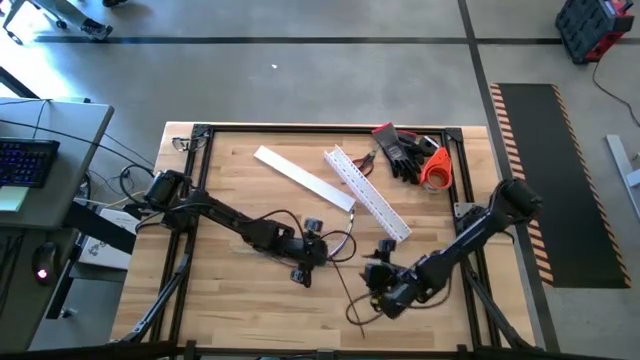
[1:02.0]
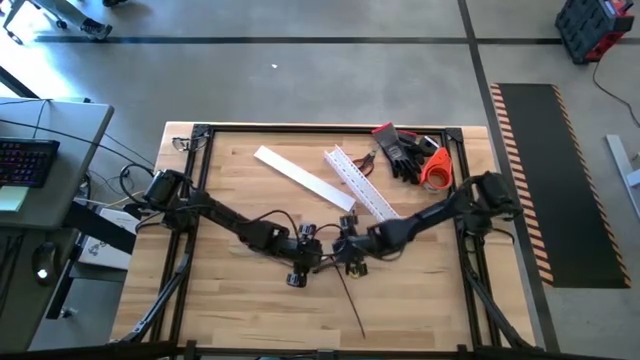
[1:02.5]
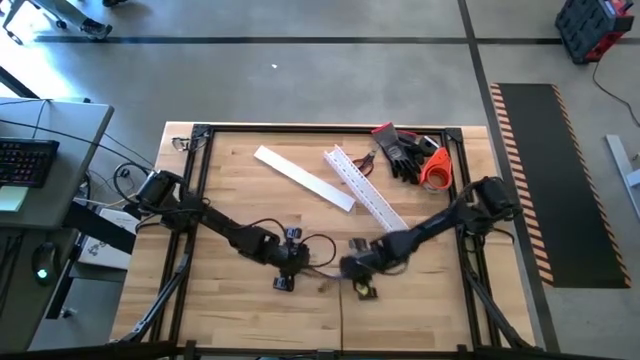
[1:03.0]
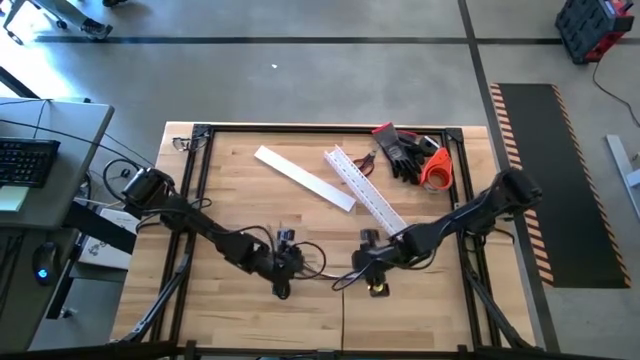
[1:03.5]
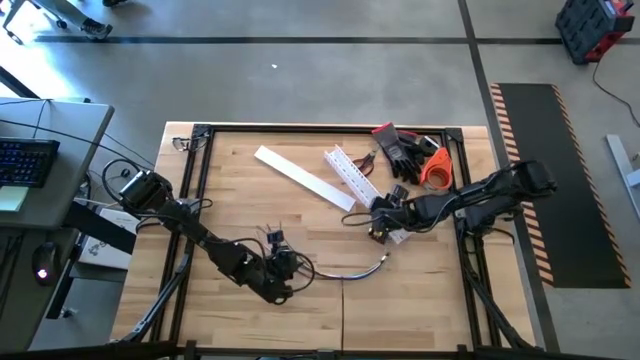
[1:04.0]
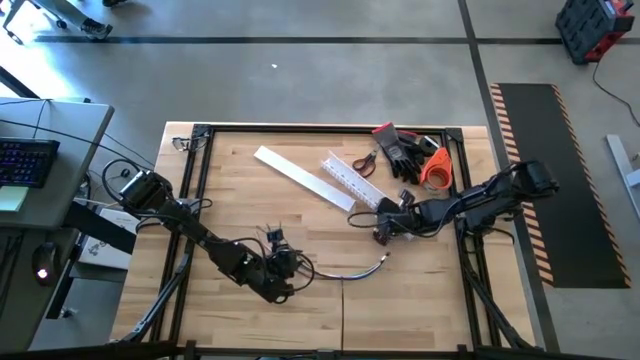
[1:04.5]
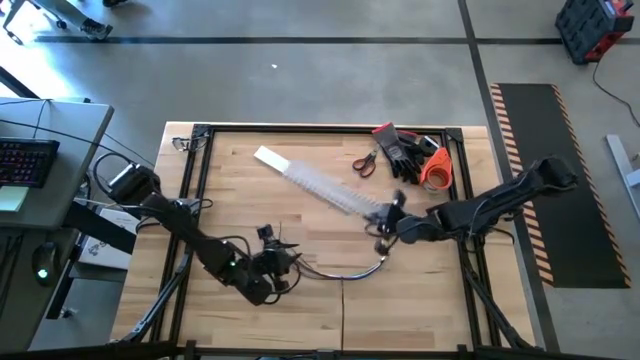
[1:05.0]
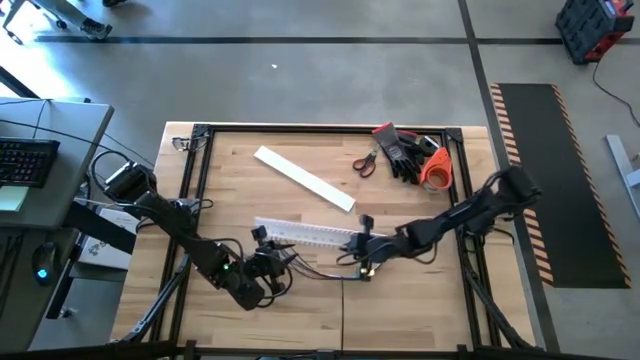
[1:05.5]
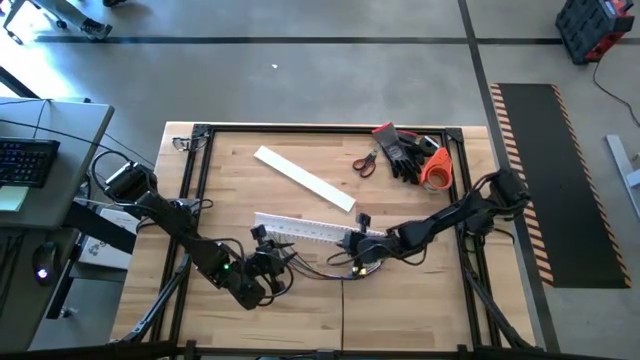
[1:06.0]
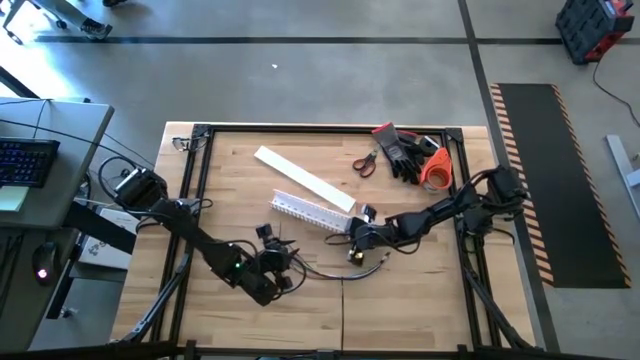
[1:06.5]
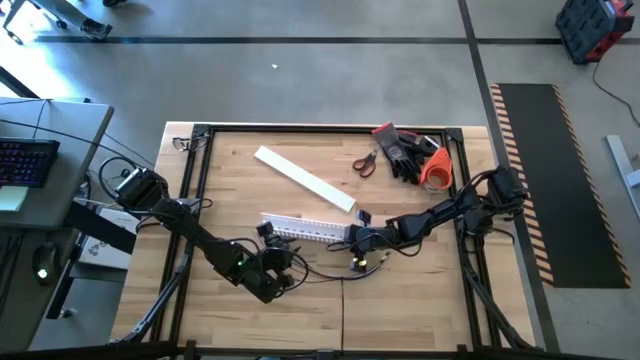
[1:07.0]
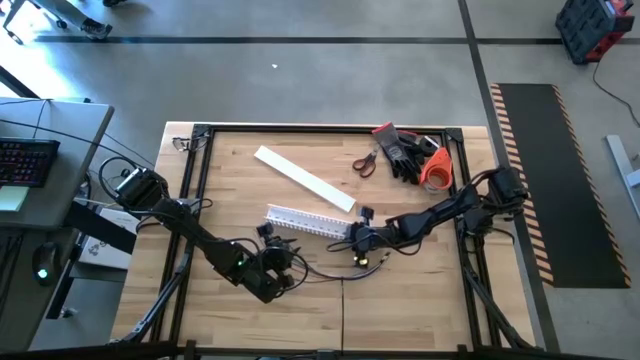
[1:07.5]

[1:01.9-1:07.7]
Task: Ziptie cables
Move the white cable duct to the center of the table

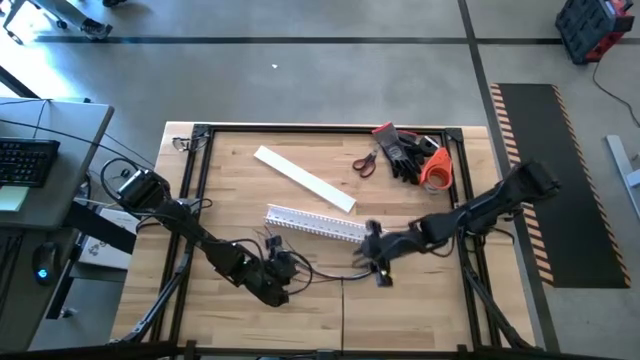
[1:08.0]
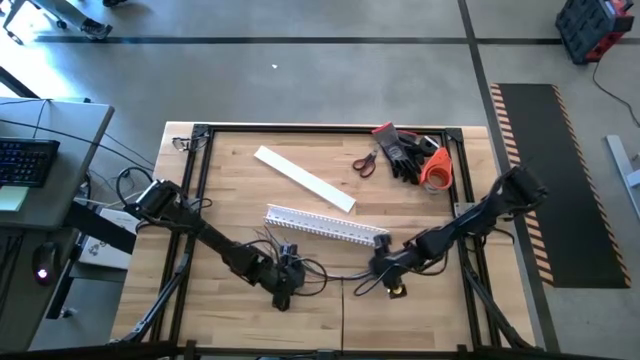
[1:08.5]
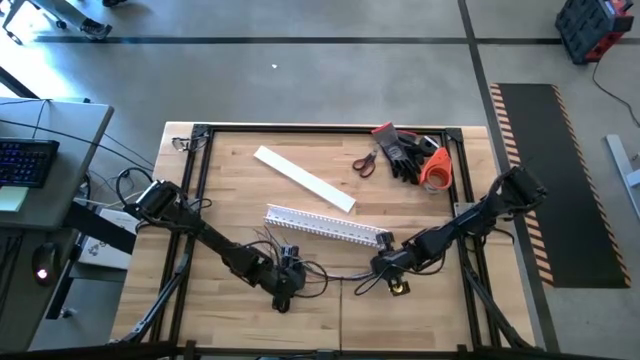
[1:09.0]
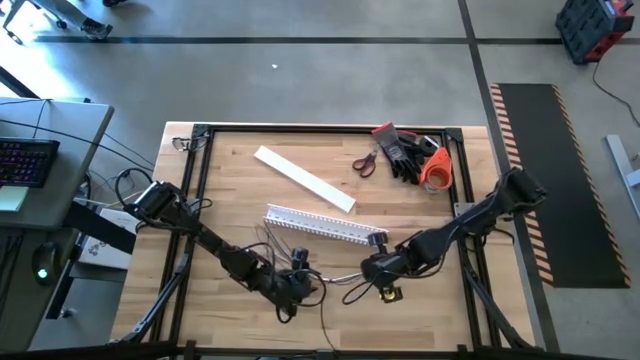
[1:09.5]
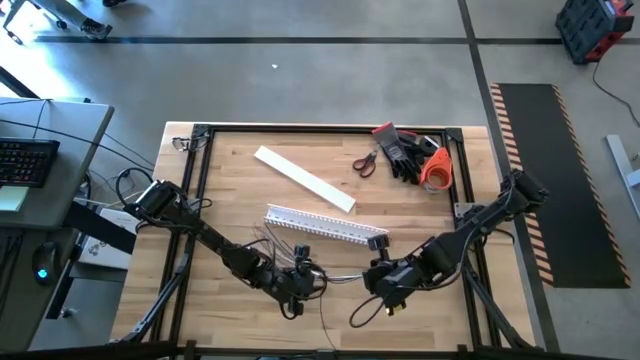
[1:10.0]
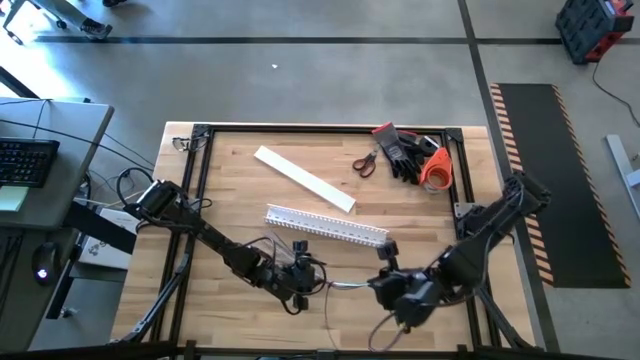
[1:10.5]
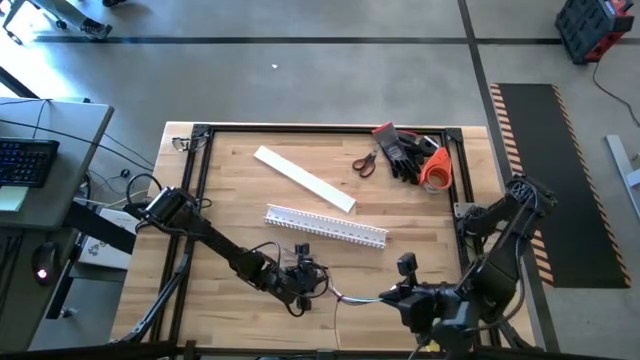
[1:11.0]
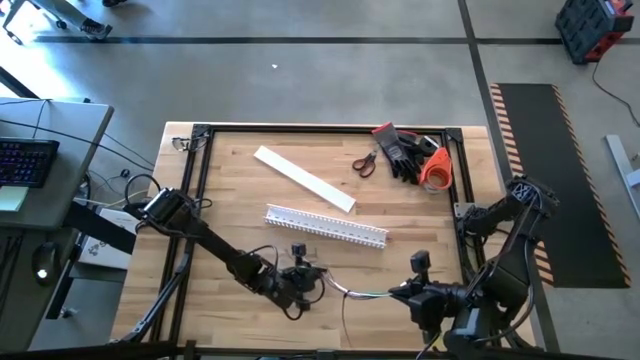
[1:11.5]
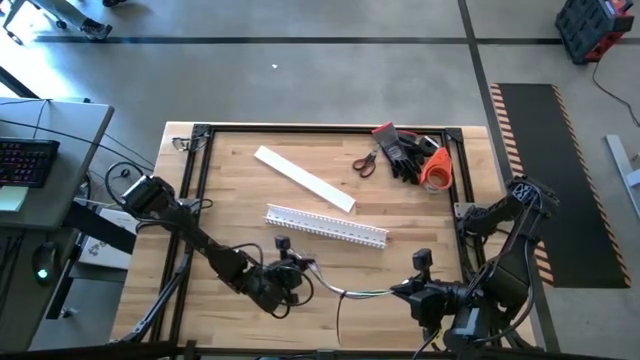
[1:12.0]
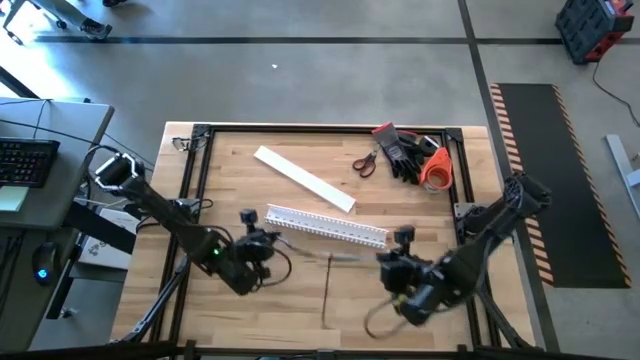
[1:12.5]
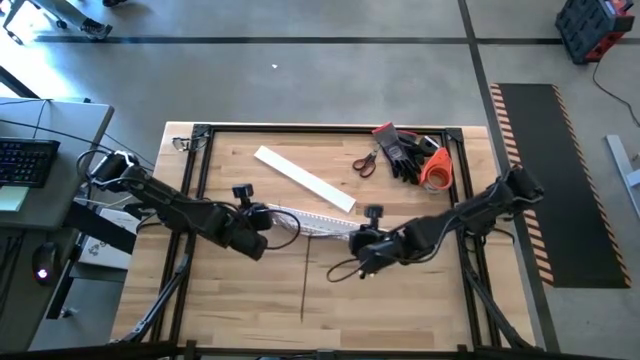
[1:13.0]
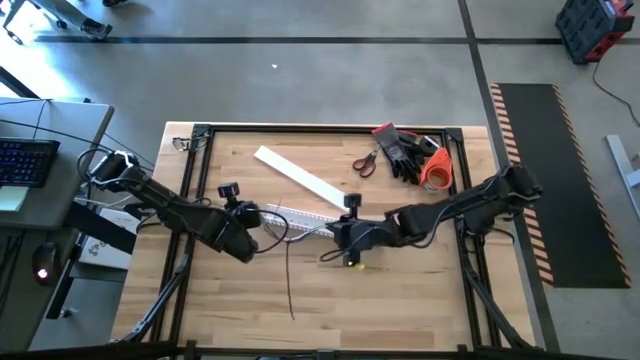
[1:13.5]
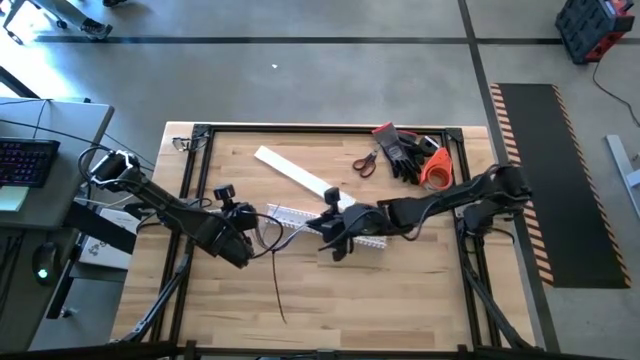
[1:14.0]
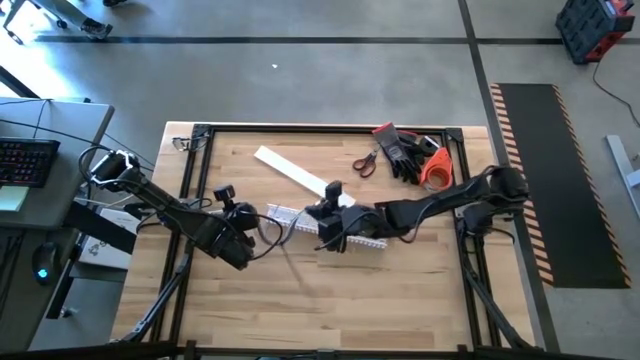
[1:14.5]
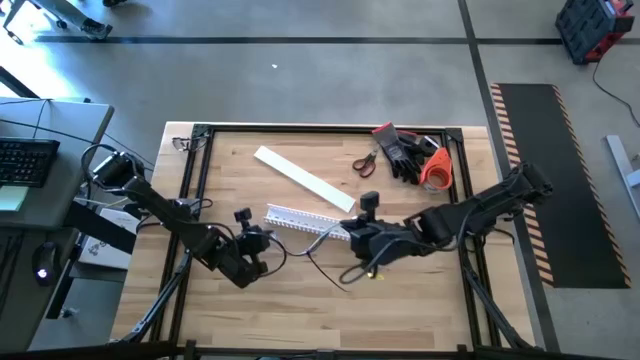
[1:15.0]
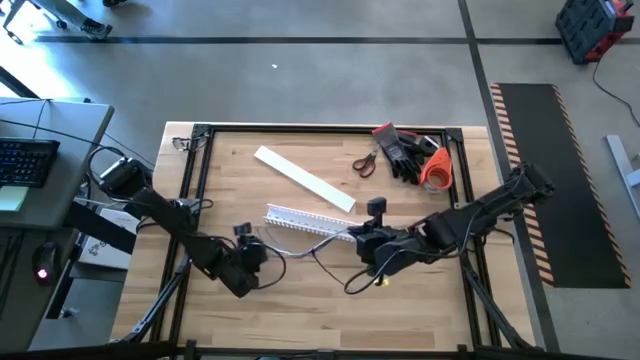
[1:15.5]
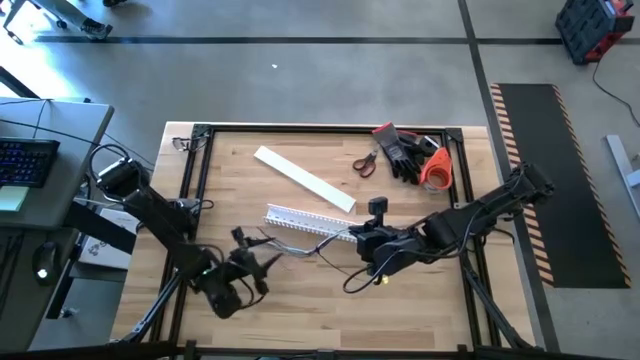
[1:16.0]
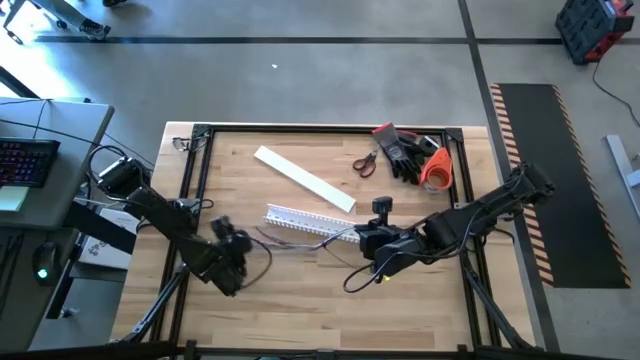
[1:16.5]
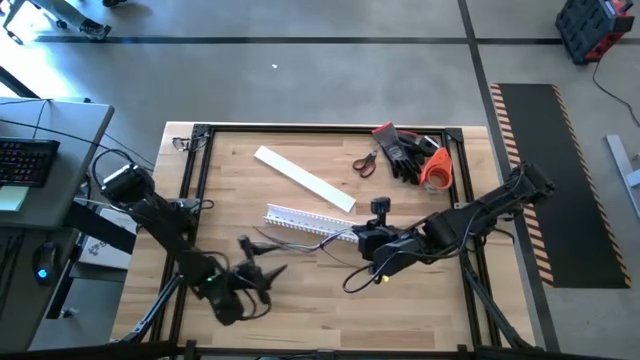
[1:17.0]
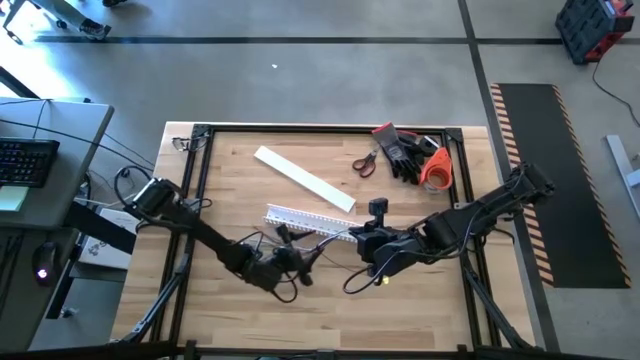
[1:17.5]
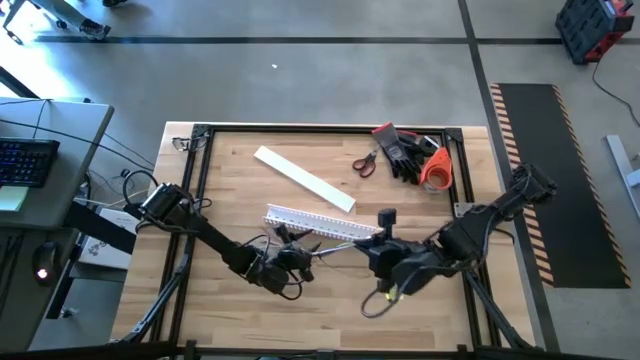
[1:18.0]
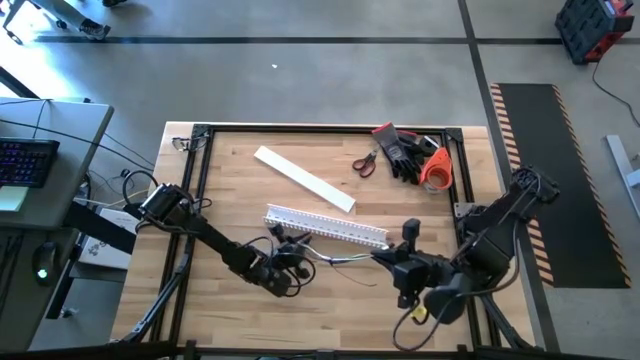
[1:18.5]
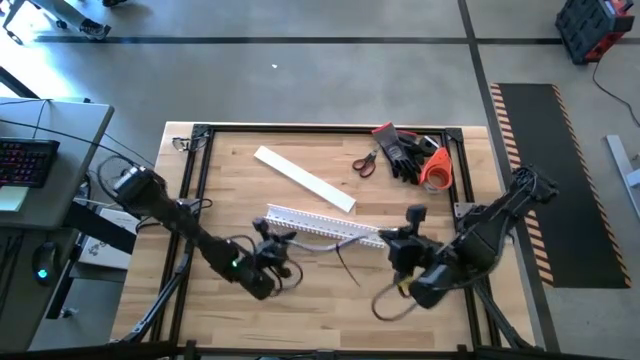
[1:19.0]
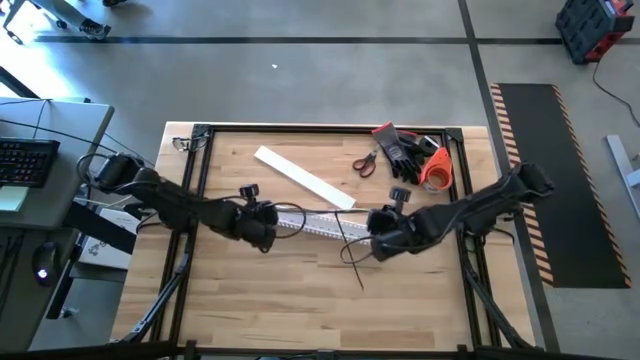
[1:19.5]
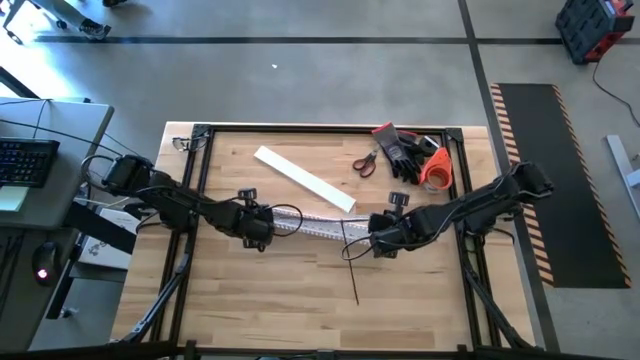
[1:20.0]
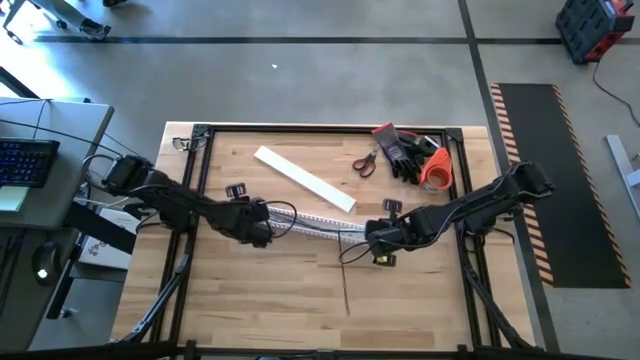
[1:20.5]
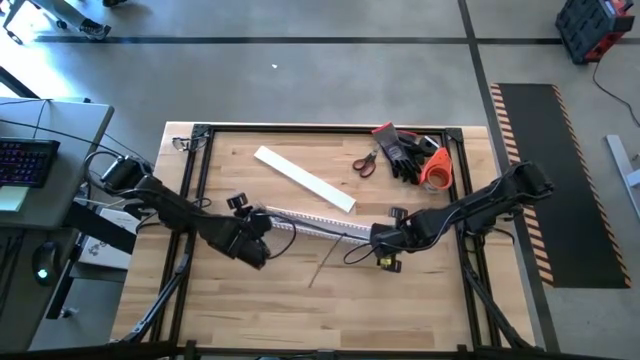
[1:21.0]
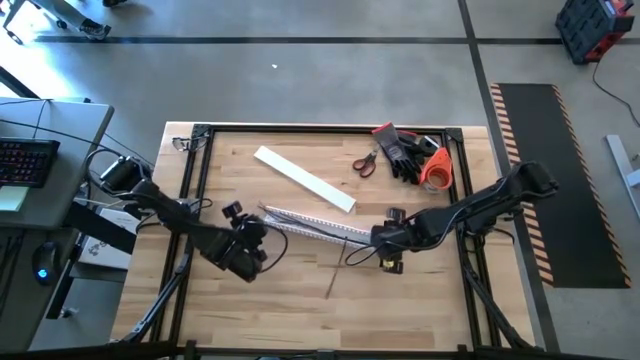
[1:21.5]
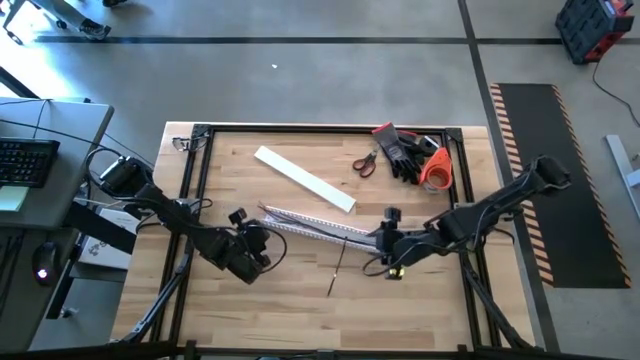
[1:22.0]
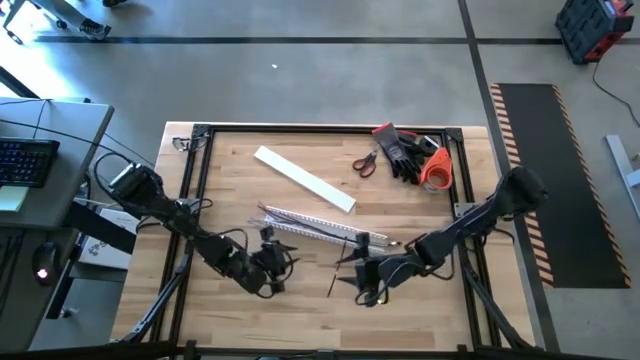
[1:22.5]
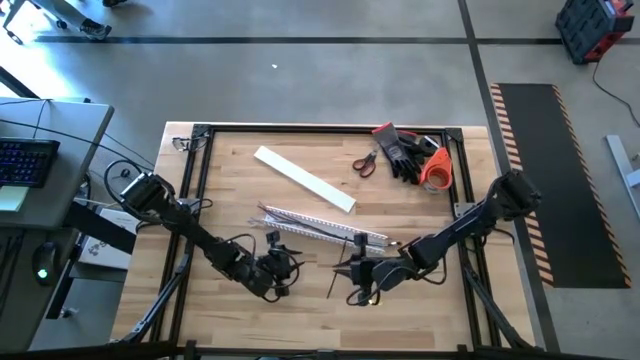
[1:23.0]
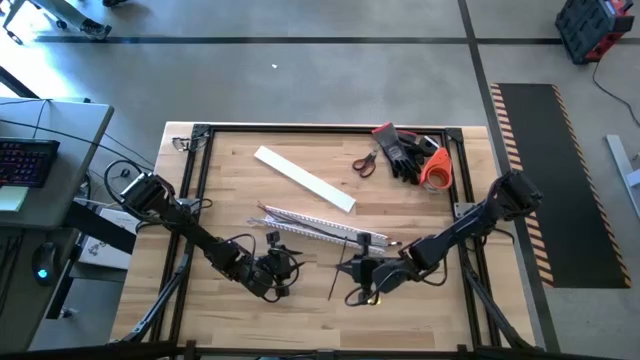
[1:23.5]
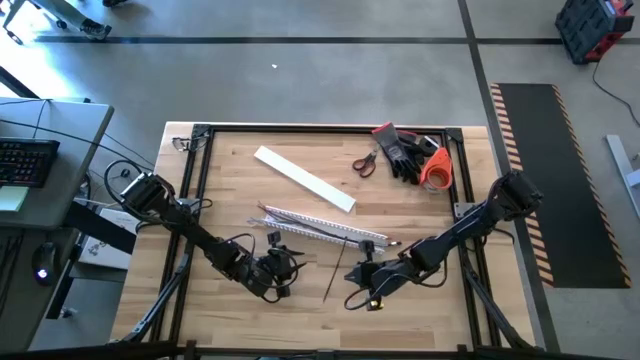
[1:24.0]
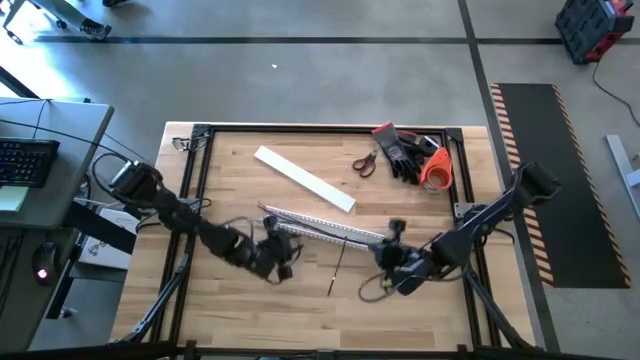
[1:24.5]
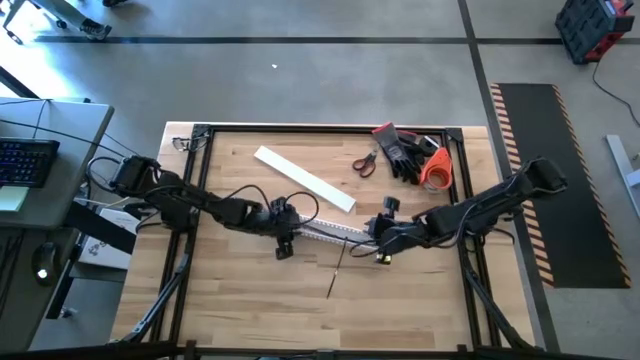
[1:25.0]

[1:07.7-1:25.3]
Put the colored ziptied cable into the white cable duct
